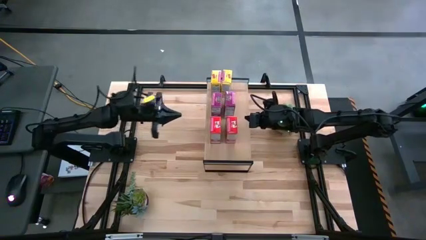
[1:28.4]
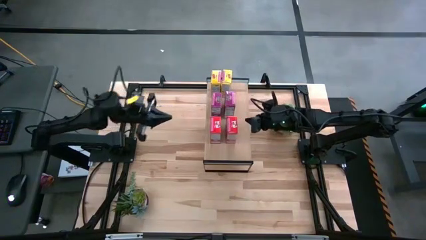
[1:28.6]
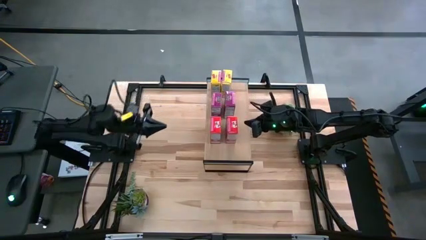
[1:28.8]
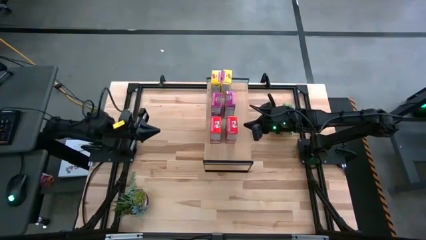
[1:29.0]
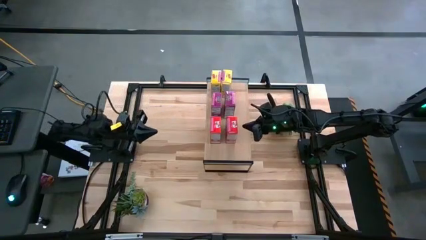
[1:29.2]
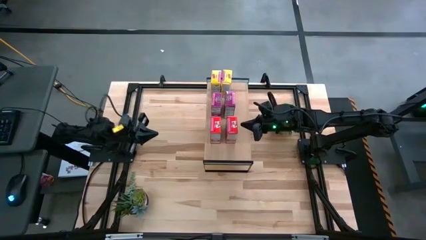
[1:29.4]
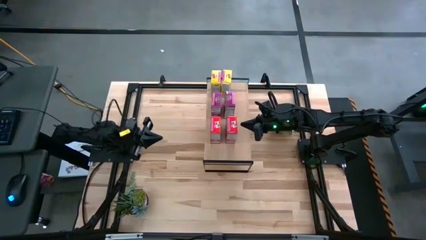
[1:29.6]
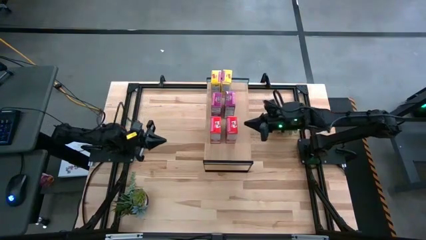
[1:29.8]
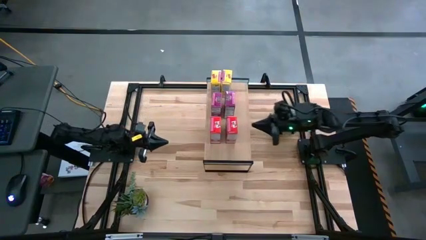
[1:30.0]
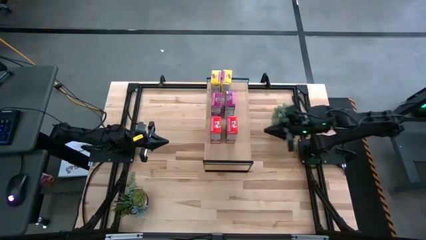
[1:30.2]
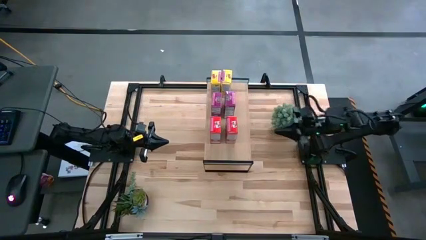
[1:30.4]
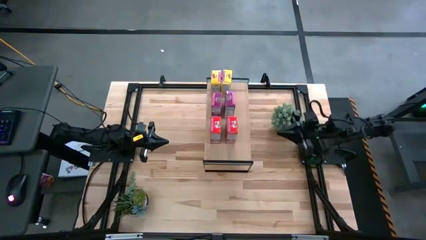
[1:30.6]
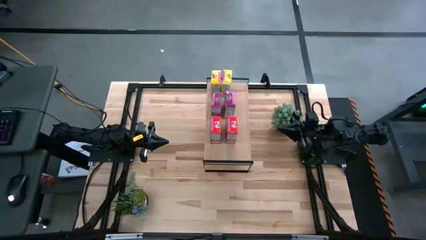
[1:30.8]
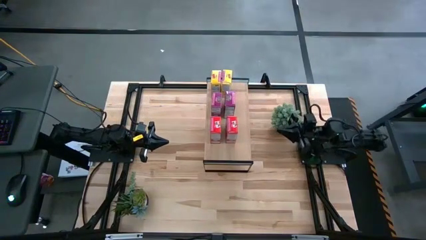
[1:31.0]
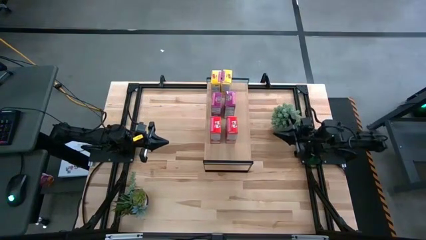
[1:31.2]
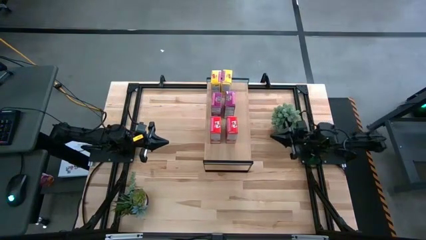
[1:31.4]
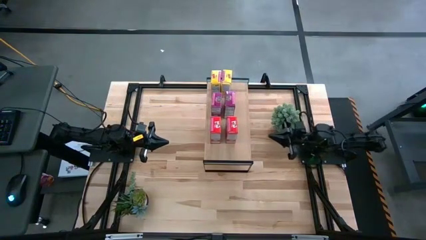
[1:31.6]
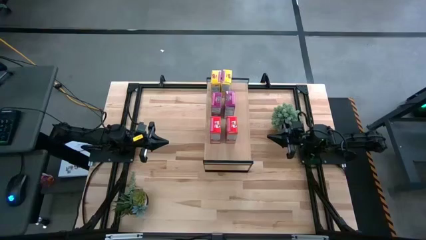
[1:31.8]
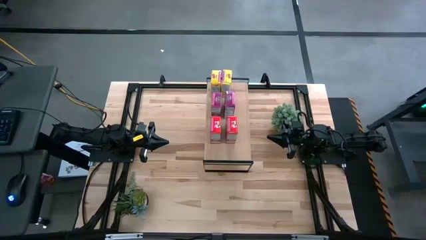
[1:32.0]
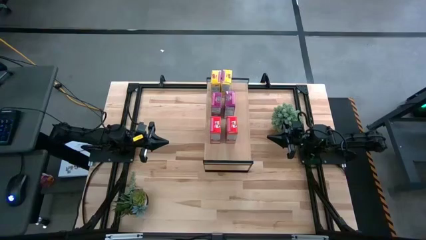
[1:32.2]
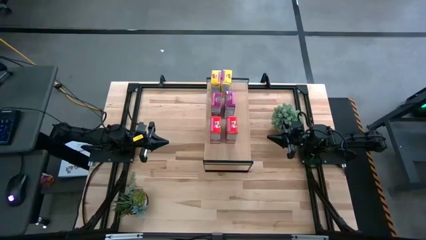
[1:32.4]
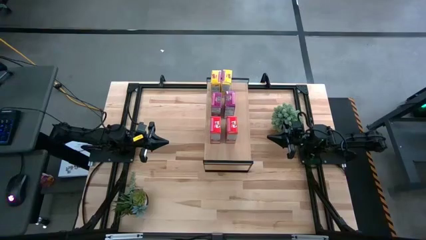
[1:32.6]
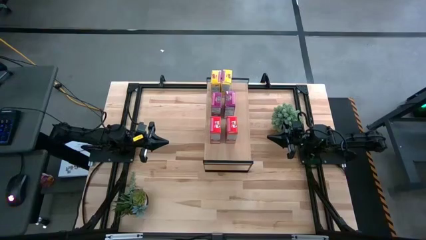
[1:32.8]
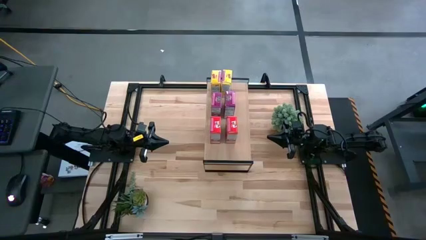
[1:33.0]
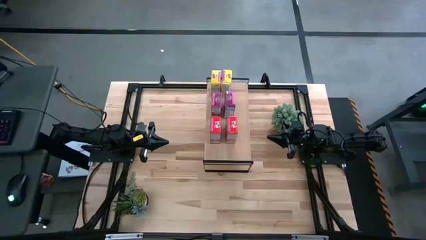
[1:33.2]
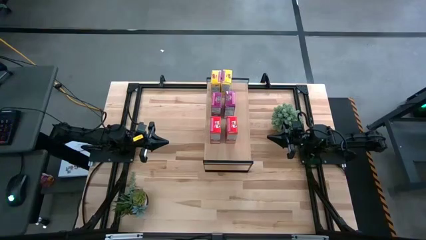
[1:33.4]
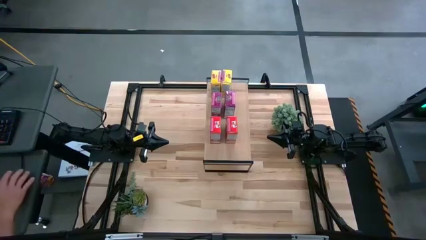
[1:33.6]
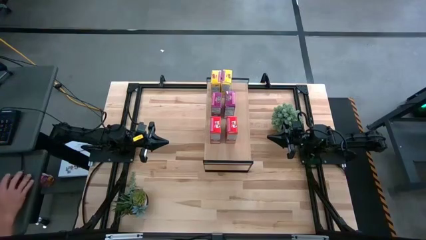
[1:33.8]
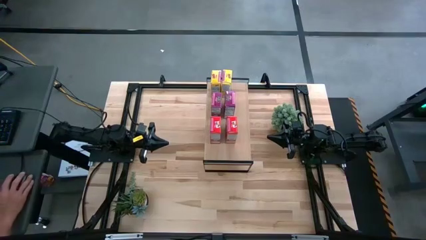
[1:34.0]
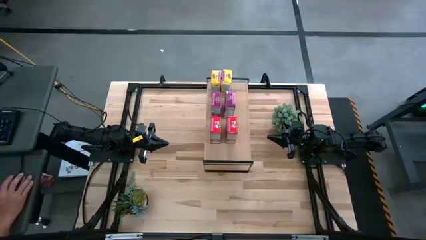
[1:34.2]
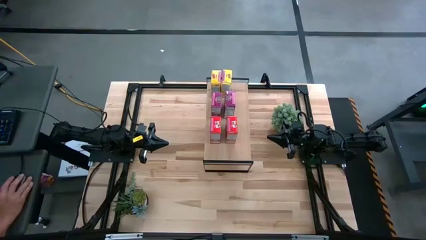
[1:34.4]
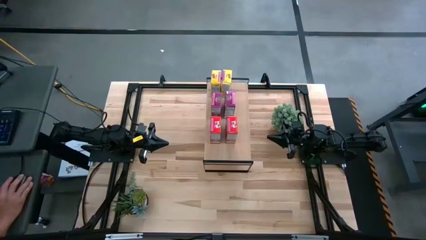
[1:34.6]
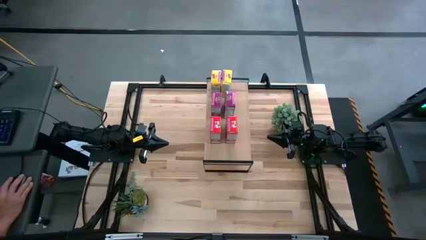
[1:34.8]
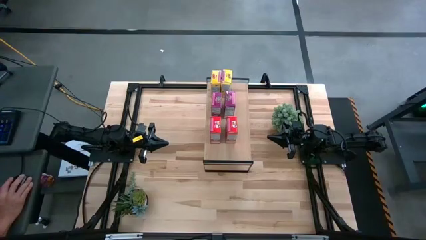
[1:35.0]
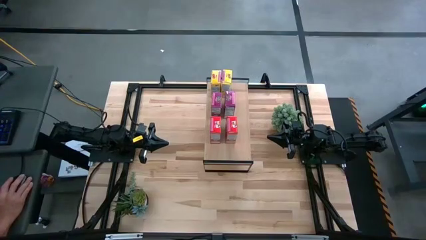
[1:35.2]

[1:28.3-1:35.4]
Task: Stack cereal on shelf
Return to Home Position

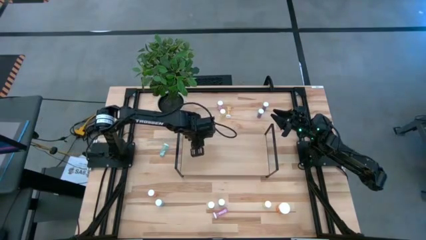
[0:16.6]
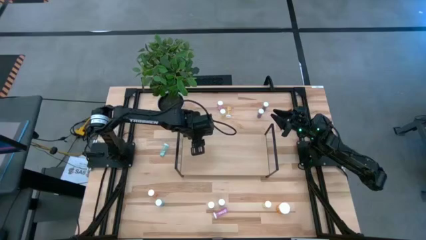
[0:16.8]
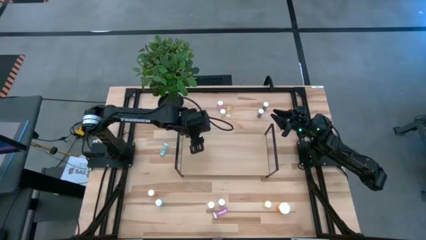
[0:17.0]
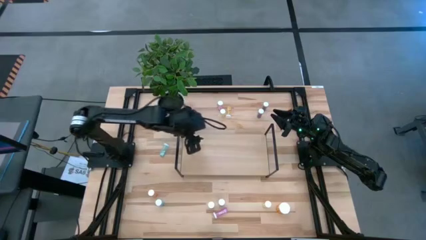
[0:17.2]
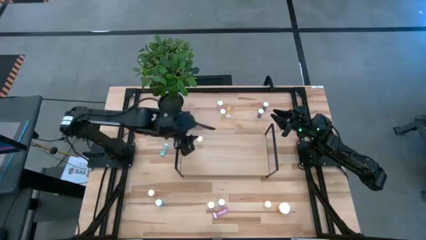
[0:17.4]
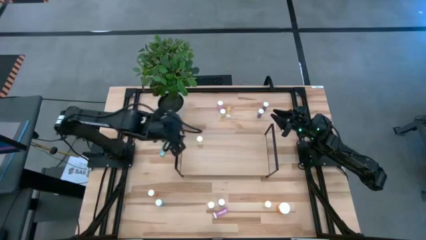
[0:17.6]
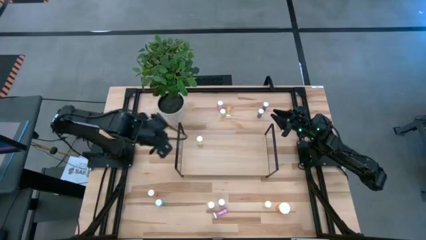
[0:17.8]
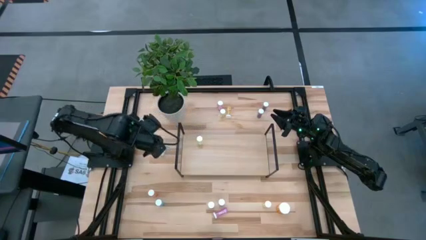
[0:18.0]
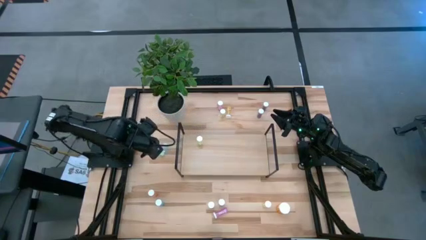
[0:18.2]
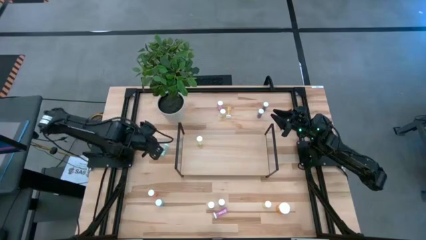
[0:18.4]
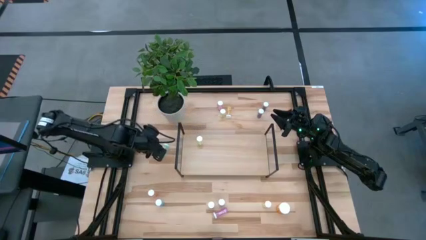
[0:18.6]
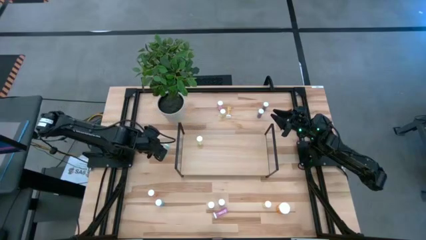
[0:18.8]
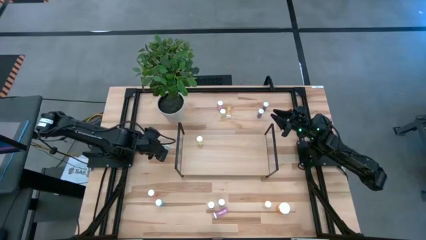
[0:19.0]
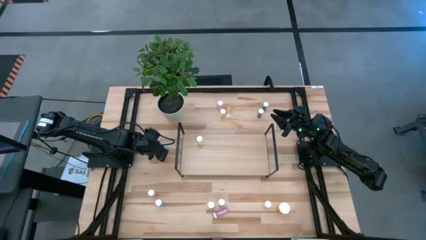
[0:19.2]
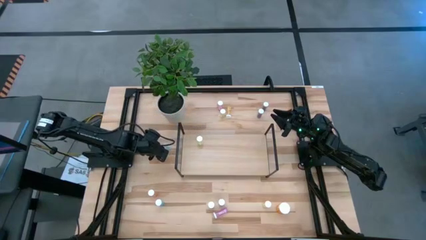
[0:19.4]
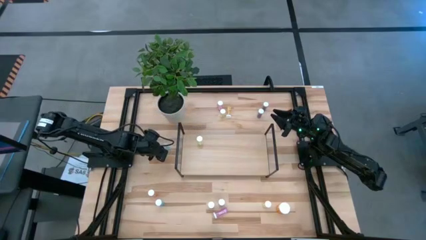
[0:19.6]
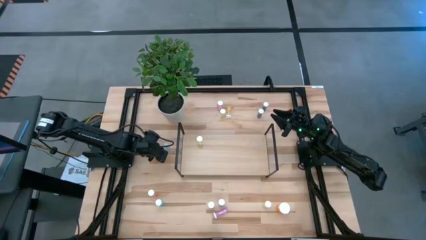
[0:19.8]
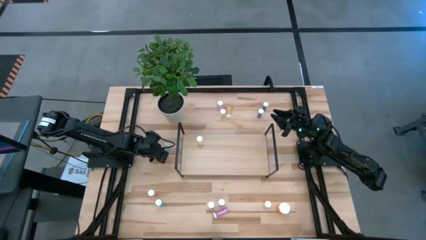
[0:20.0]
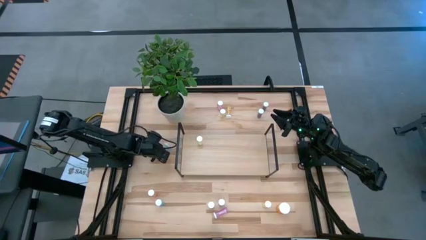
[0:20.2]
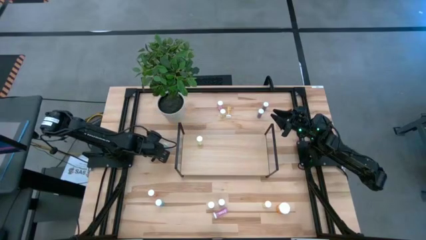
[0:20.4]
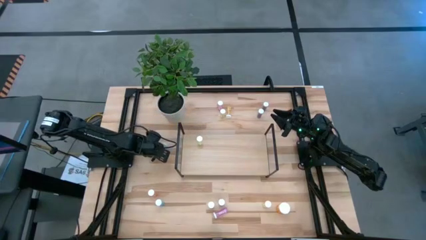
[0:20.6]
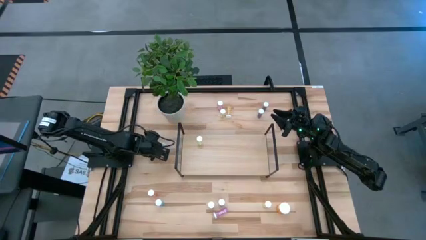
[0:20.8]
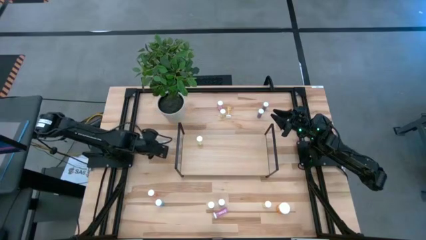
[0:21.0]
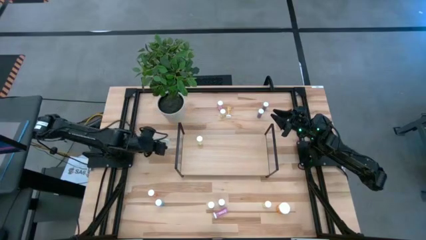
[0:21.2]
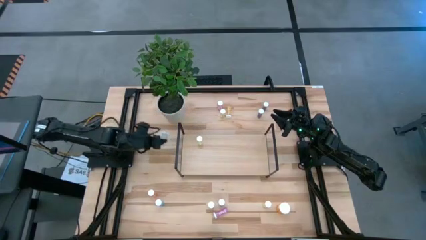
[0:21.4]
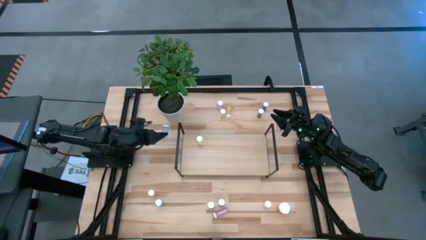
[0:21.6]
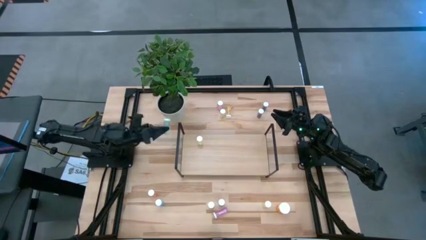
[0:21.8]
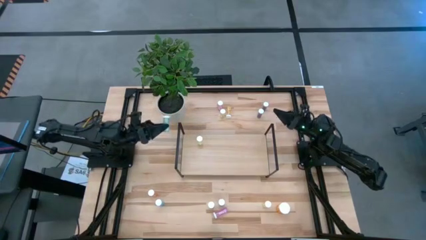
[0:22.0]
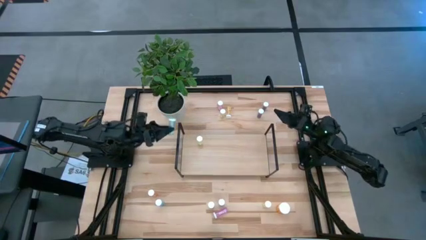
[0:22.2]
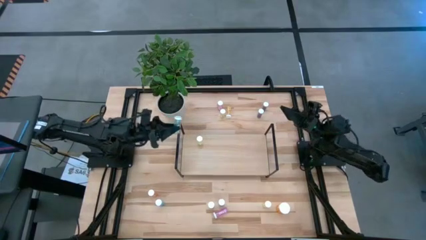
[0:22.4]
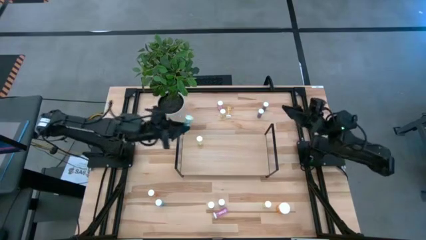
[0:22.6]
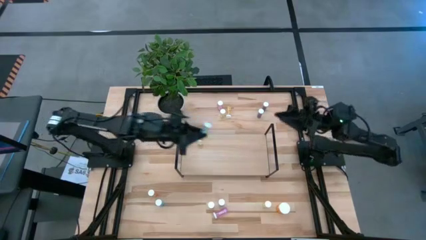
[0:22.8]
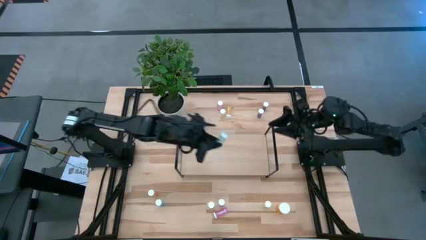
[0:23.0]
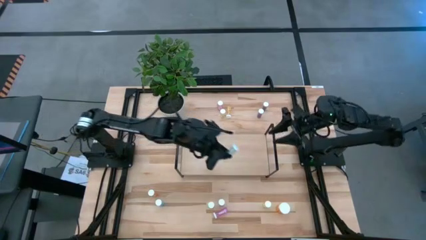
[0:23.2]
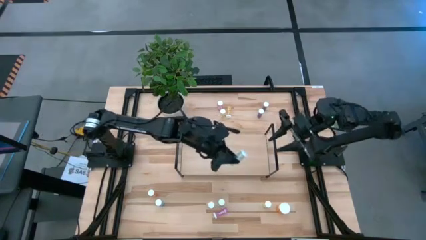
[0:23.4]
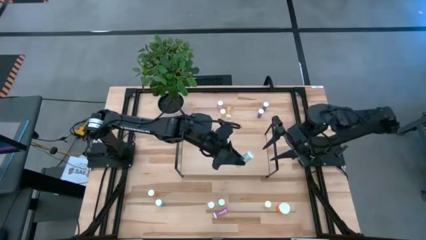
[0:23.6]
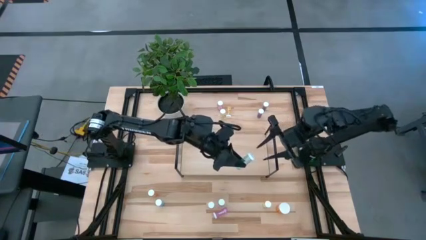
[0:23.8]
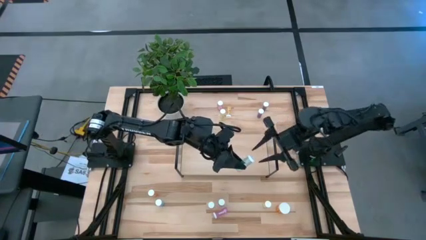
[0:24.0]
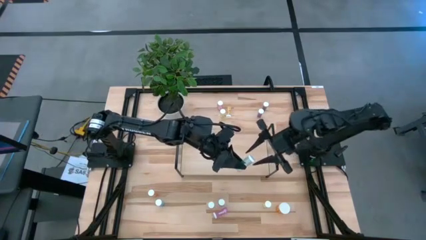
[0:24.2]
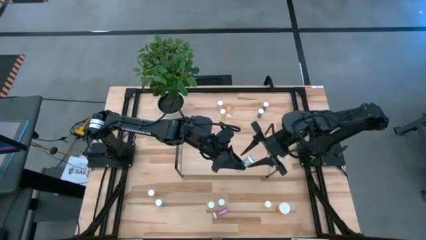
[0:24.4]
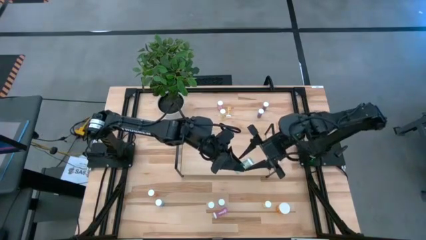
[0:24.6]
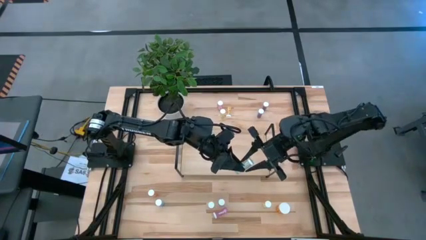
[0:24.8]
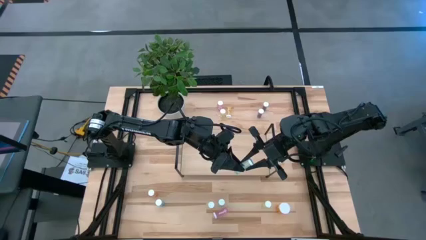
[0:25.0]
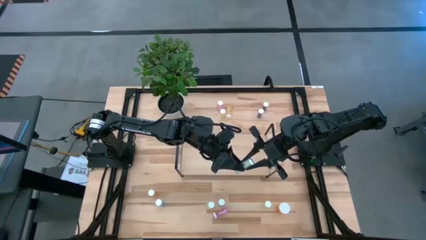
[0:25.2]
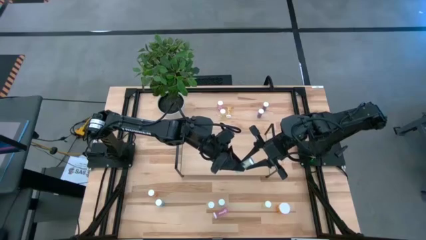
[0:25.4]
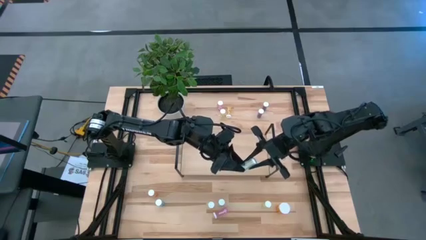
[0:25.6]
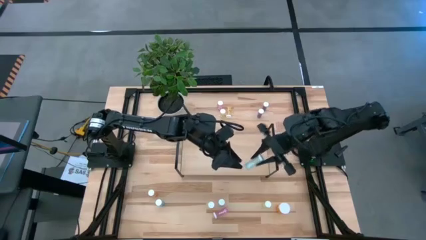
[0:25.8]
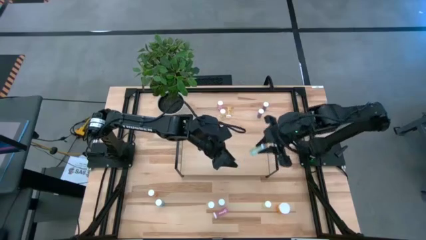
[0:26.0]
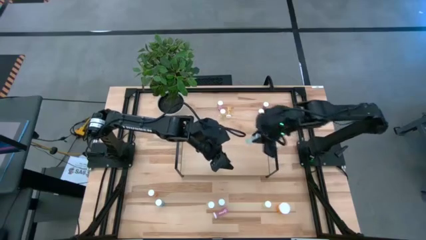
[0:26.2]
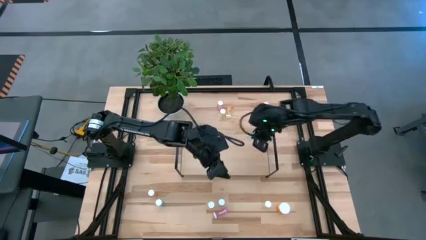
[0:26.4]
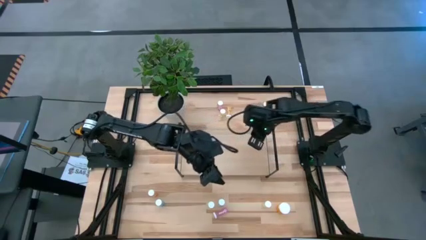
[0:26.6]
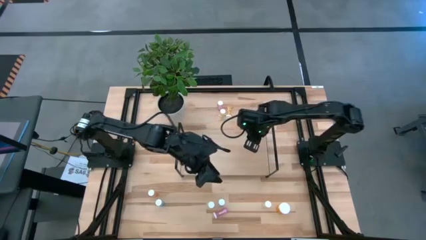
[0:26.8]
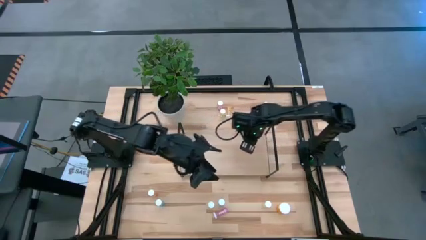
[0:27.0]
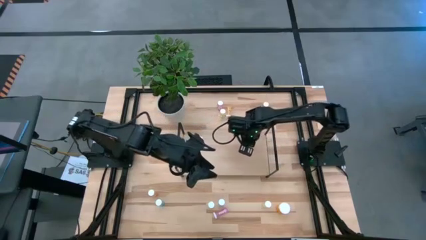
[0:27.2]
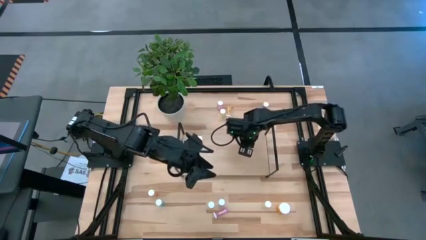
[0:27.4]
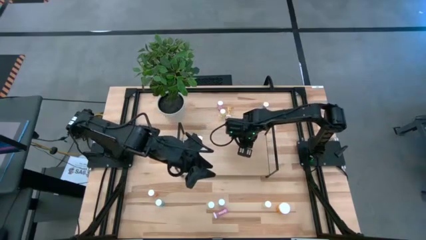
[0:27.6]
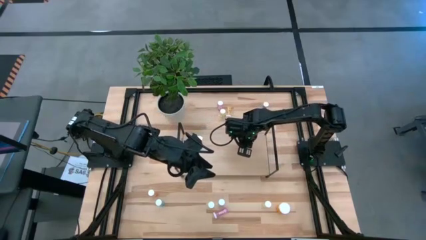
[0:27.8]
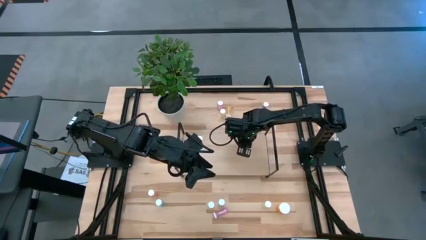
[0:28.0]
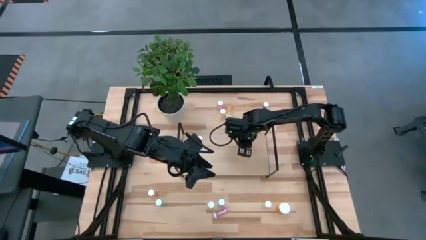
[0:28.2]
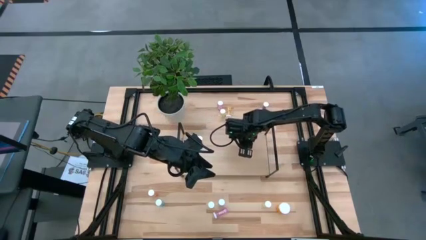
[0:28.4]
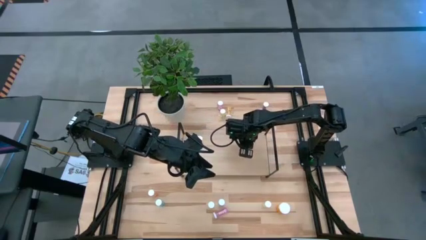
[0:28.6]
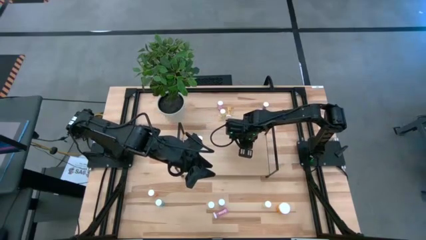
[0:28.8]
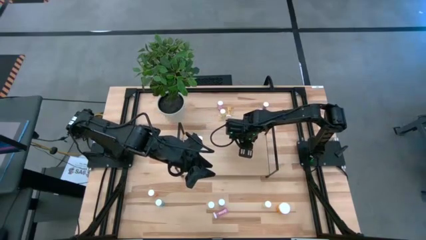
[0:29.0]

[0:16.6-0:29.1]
Task: Pick and place medicine bottles onto shelf by color
Put the blue pill bottle on the shelf
